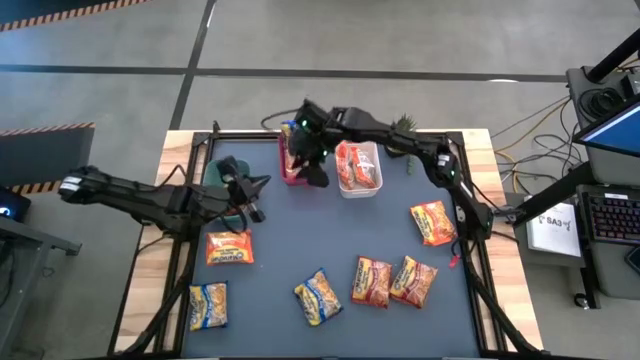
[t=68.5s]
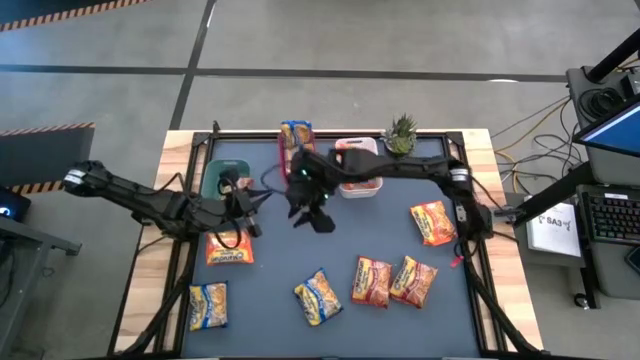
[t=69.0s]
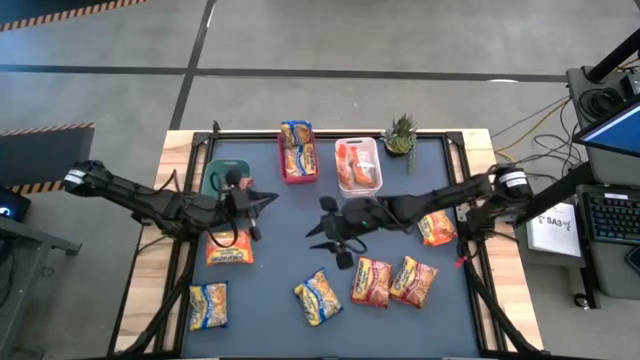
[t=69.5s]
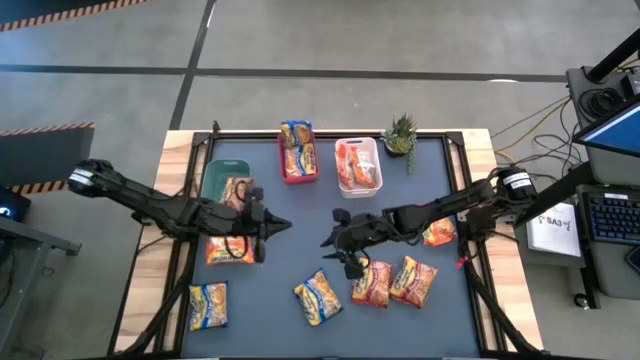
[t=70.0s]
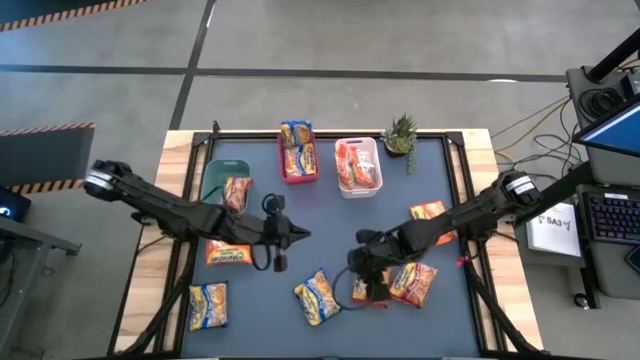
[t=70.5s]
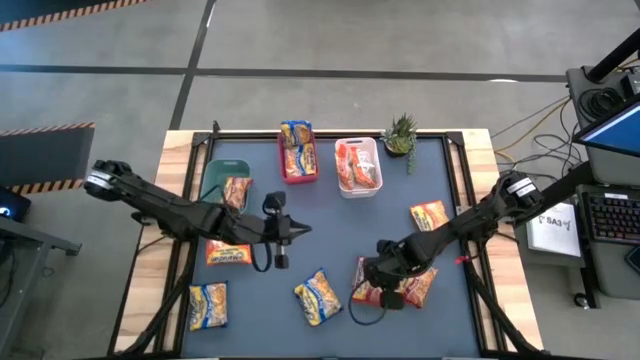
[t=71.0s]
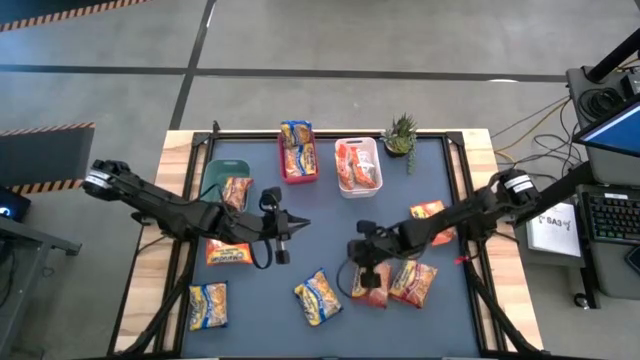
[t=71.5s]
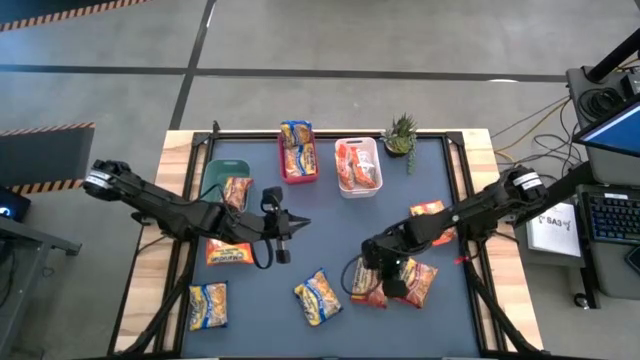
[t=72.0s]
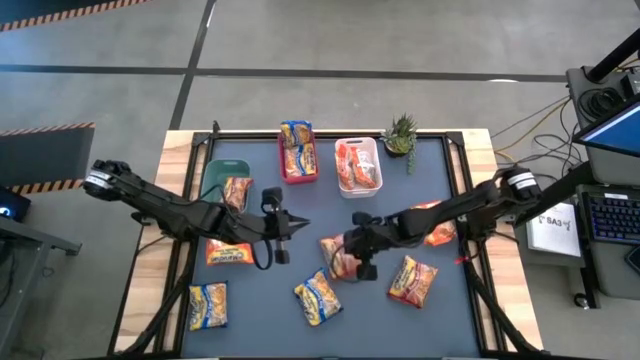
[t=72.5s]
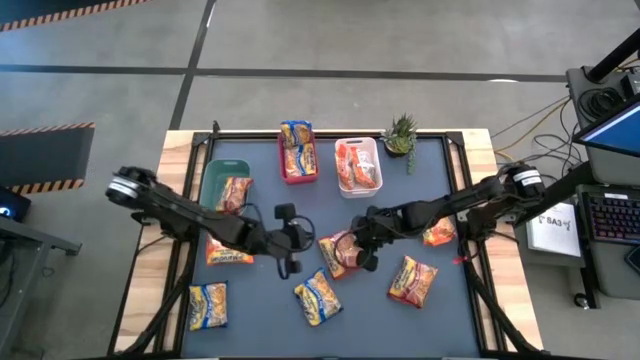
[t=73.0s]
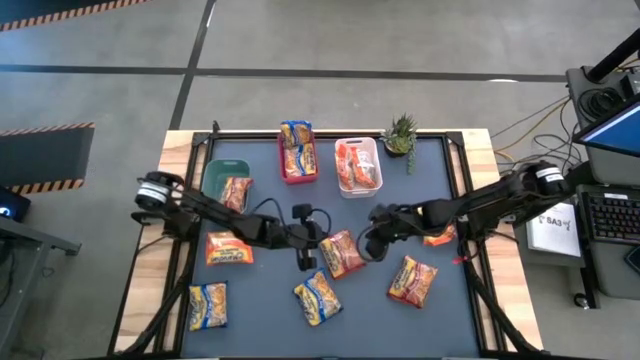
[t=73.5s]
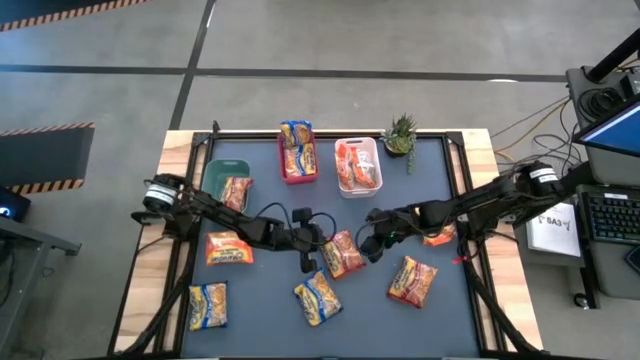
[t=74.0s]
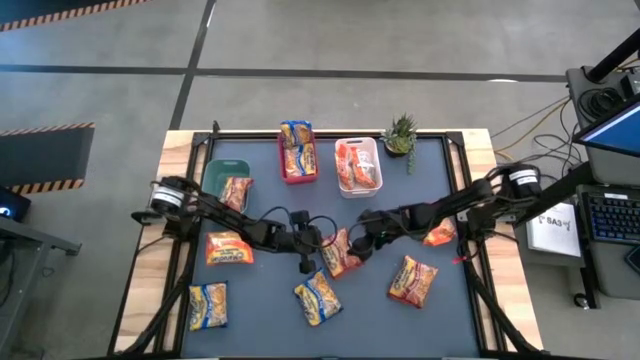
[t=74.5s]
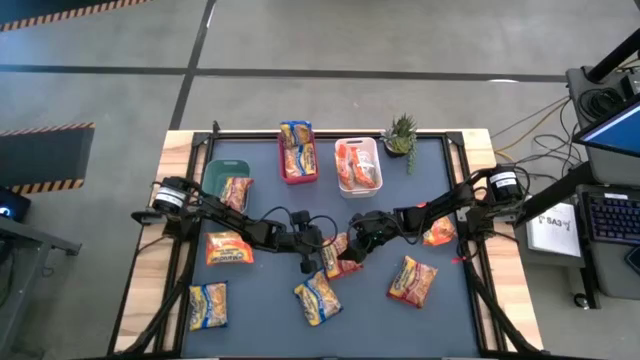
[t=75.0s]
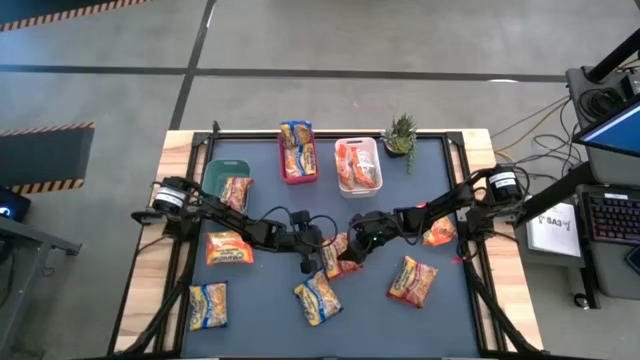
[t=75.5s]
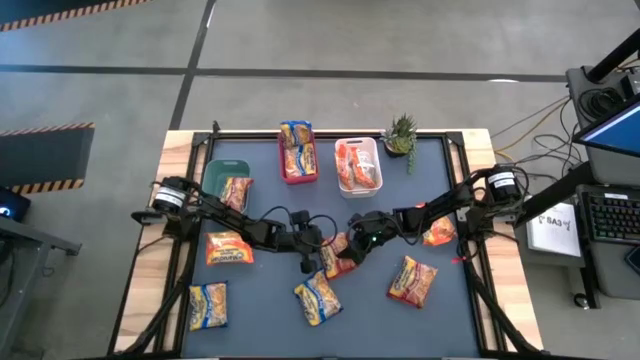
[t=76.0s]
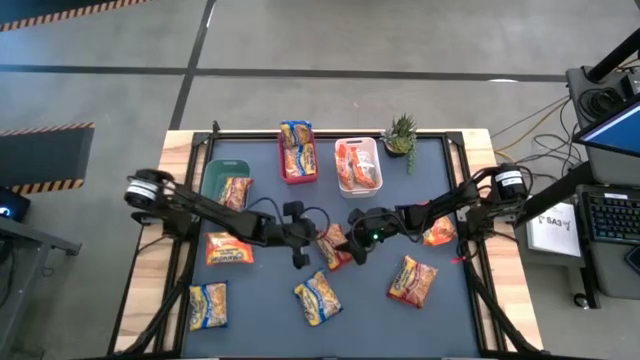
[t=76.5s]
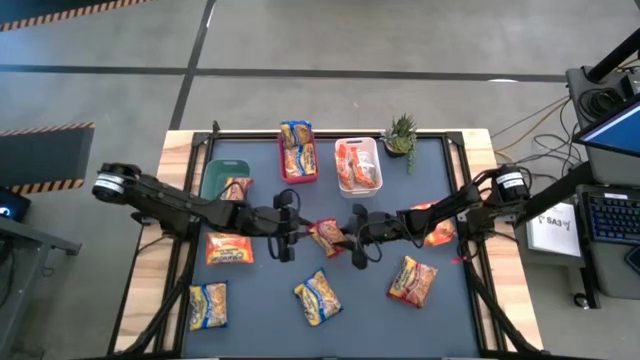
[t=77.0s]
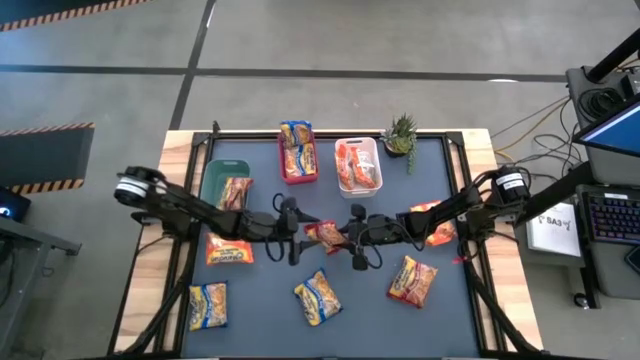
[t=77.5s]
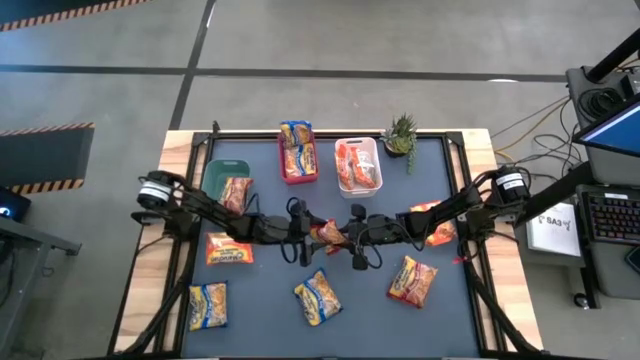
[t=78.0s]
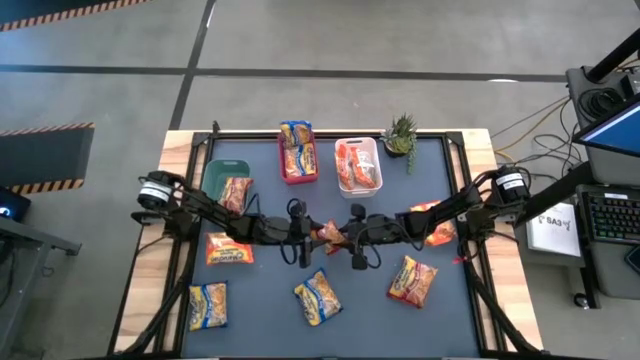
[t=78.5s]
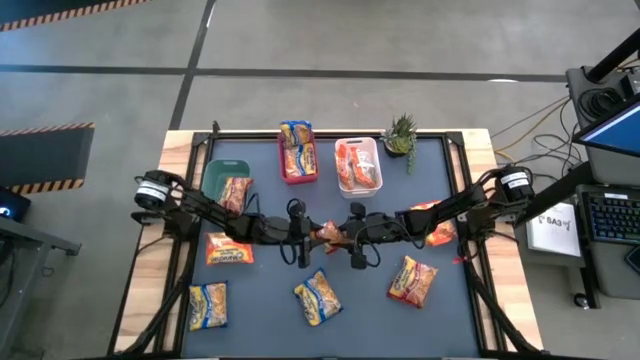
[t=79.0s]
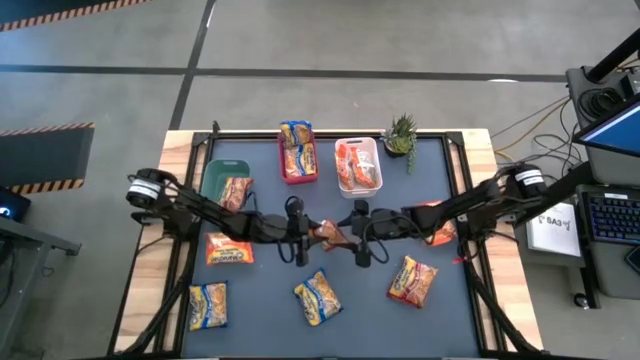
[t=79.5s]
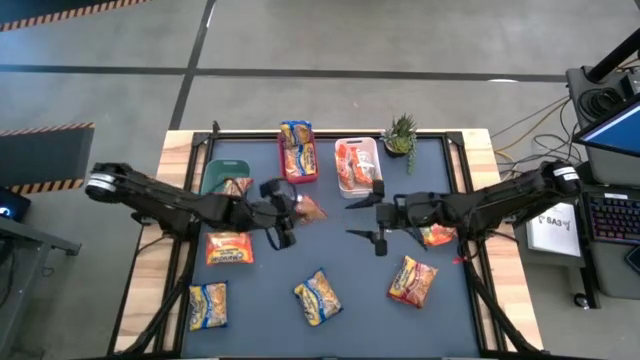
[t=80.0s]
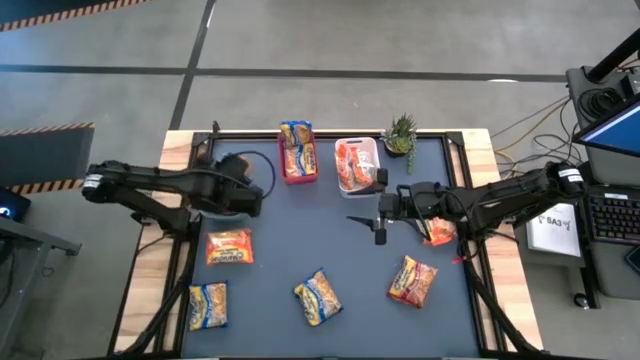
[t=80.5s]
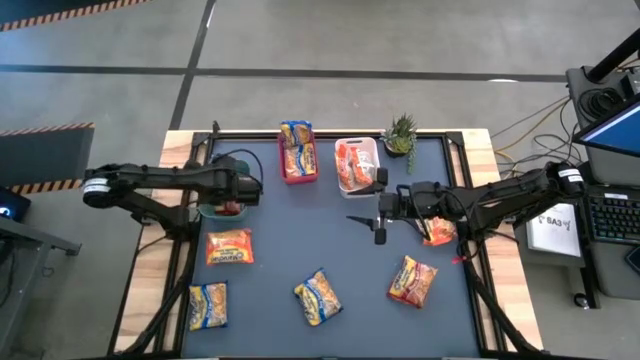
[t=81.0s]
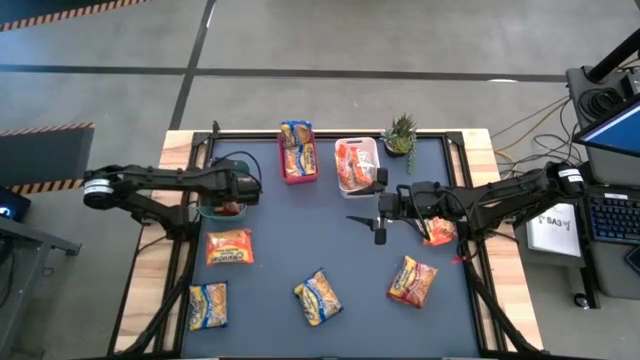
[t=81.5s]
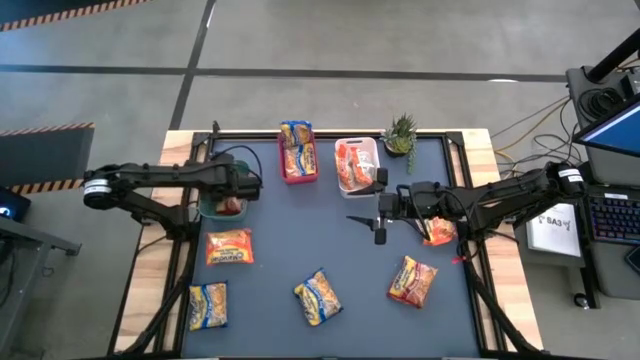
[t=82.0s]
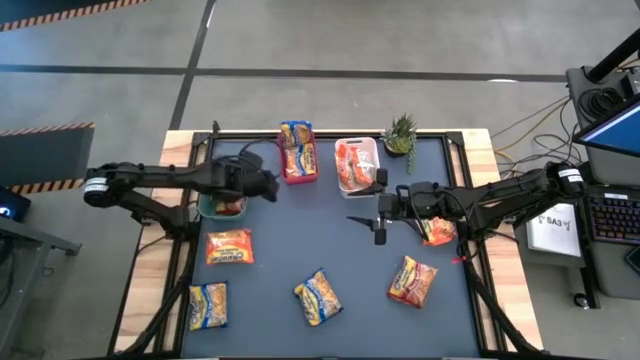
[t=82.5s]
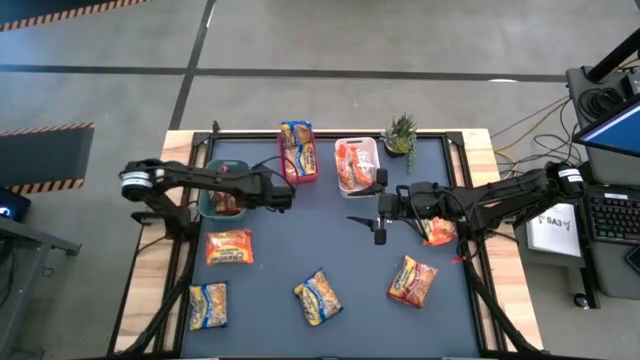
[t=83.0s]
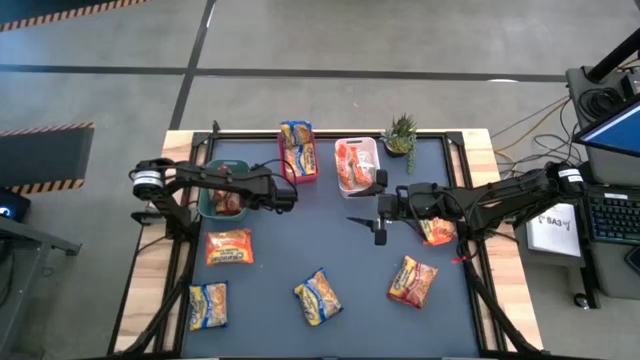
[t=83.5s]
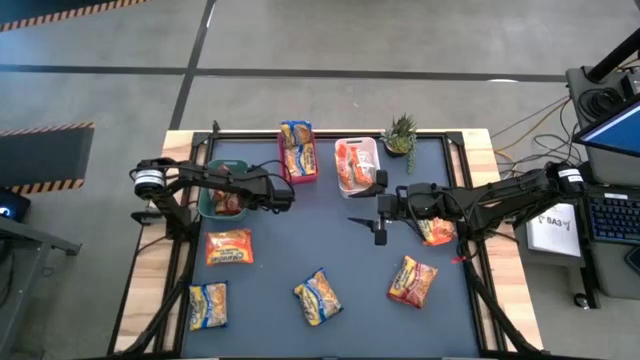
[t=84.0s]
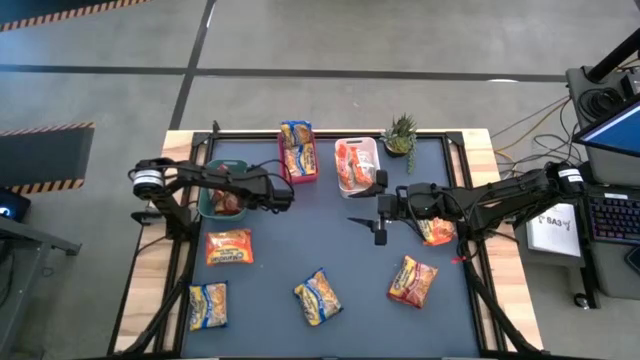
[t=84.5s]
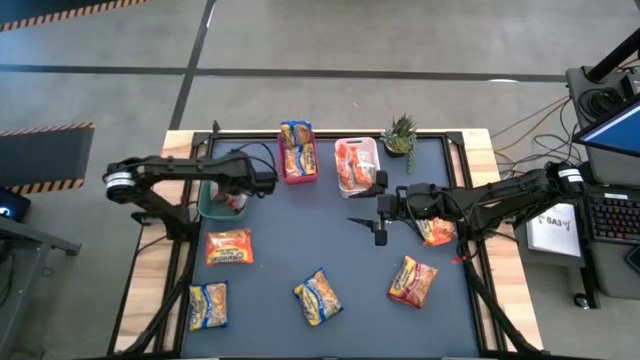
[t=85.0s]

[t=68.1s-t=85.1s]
Task: Sort Maruchan noodles
Put the red noodle pack into the green bin

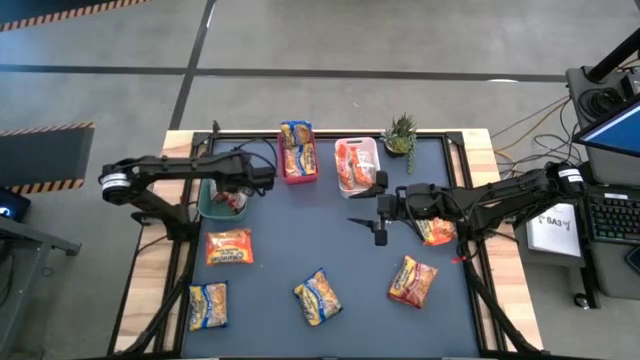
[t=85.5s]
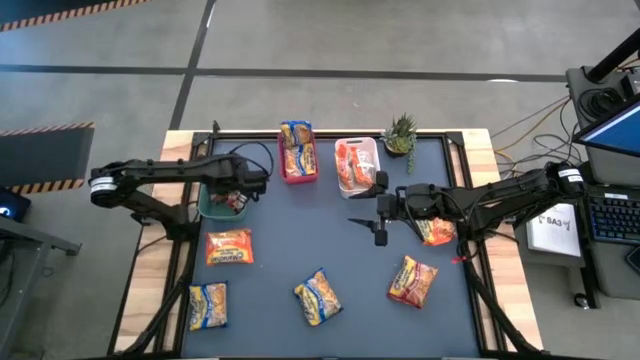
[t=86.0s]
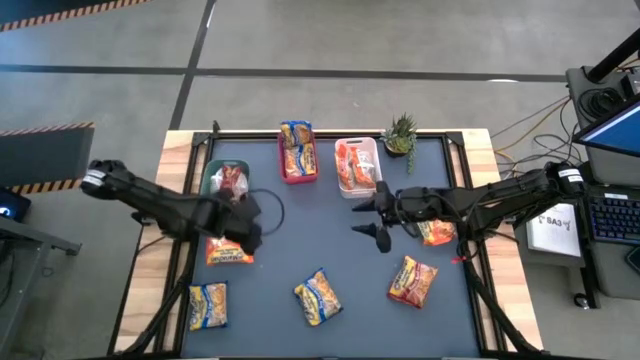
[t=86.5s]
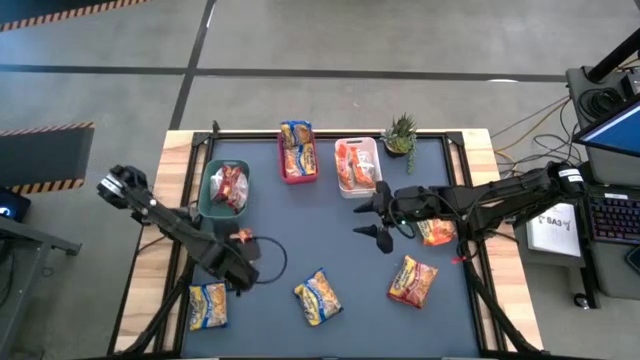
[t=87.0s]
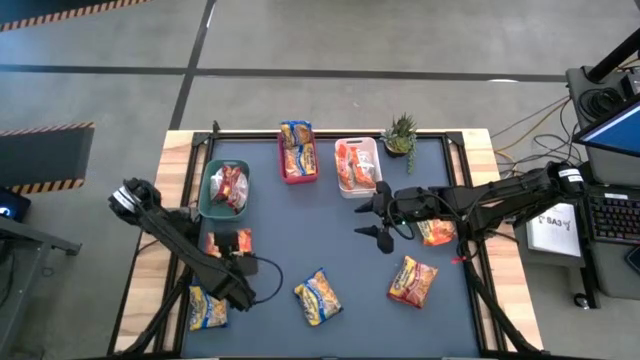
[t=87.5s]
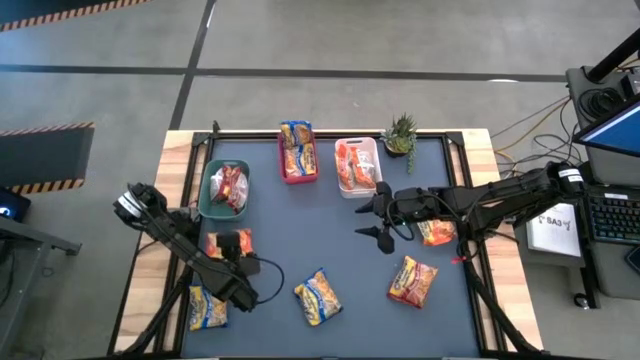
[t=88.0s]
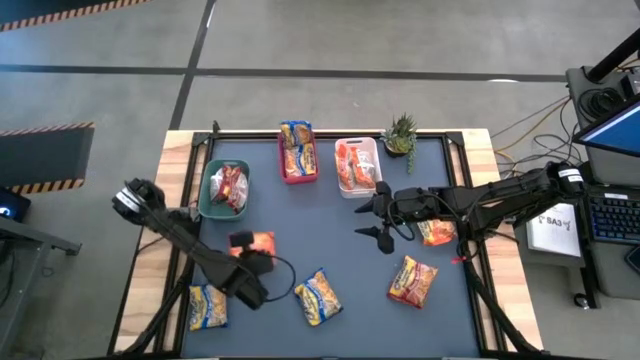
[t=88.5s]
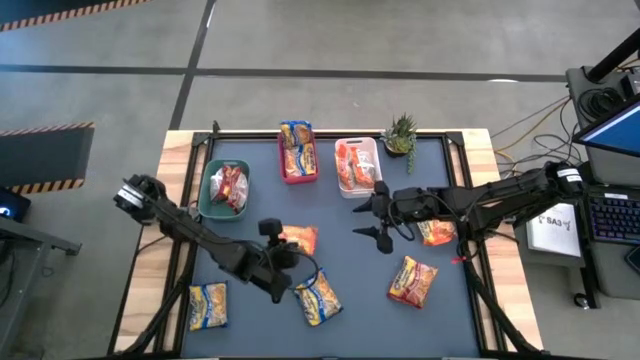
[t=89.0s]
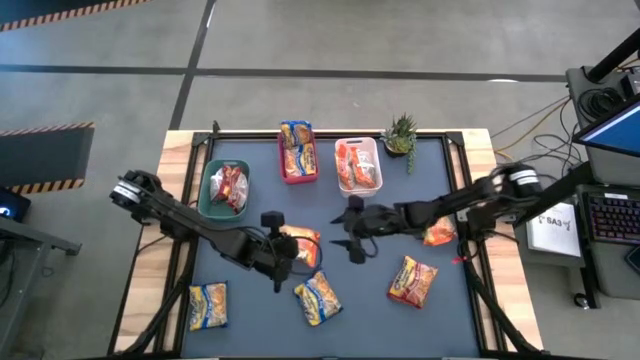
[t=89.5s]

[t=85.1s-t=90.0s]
Put the orange noodle pack into the white bin
